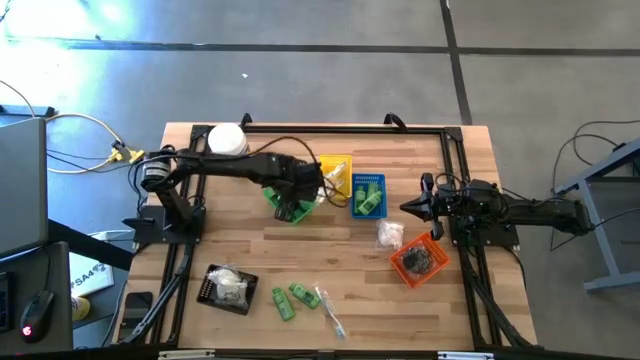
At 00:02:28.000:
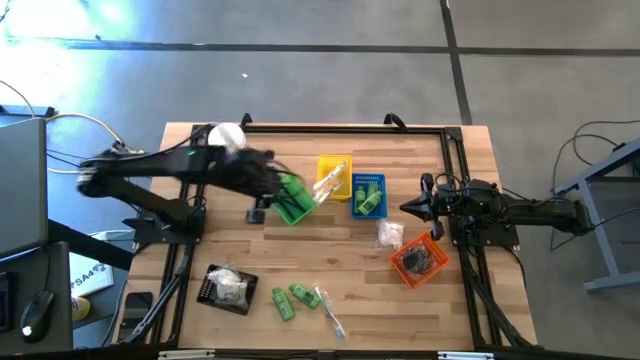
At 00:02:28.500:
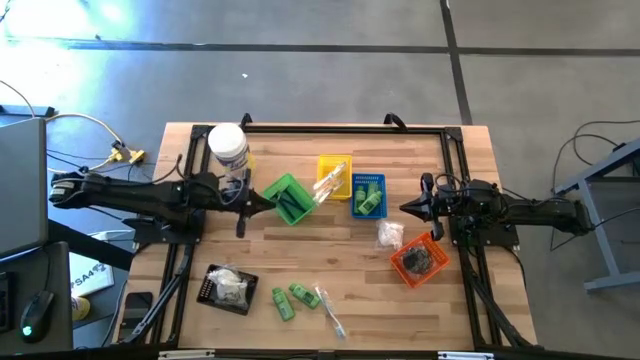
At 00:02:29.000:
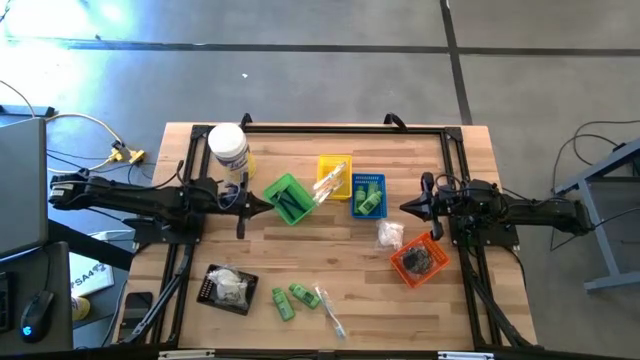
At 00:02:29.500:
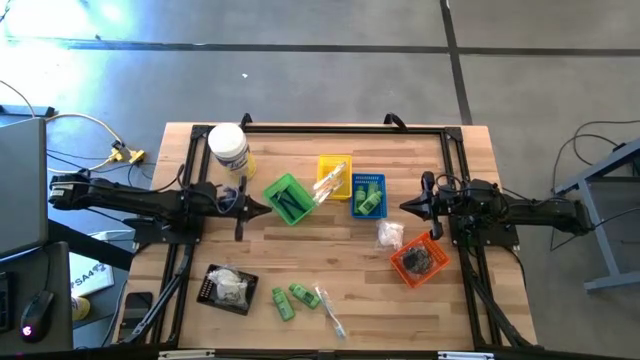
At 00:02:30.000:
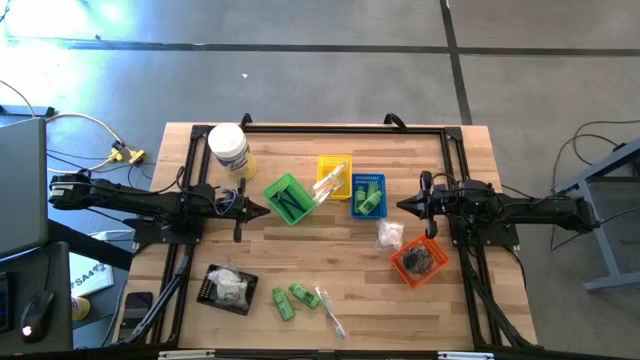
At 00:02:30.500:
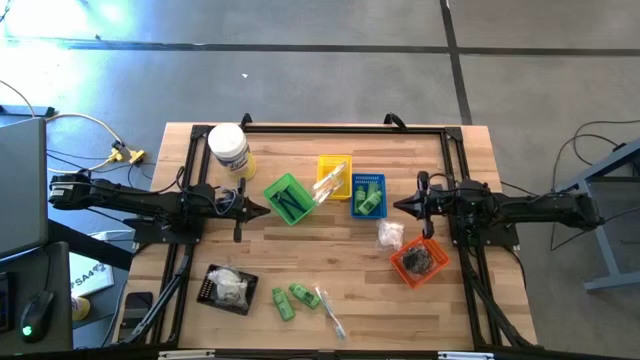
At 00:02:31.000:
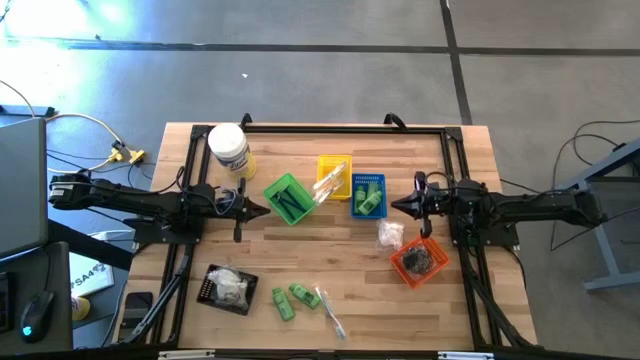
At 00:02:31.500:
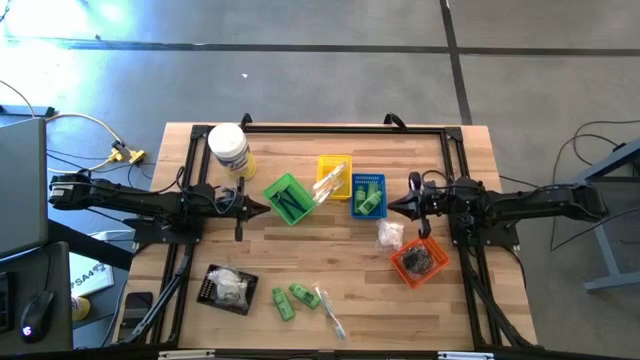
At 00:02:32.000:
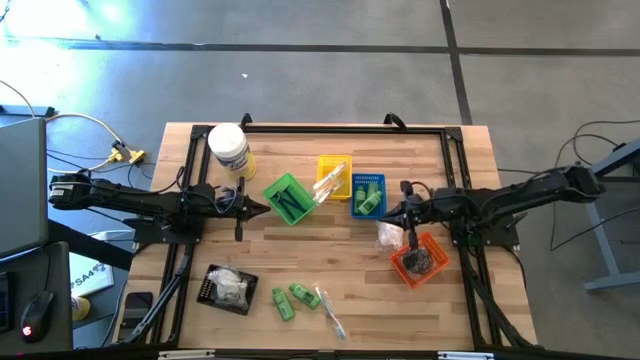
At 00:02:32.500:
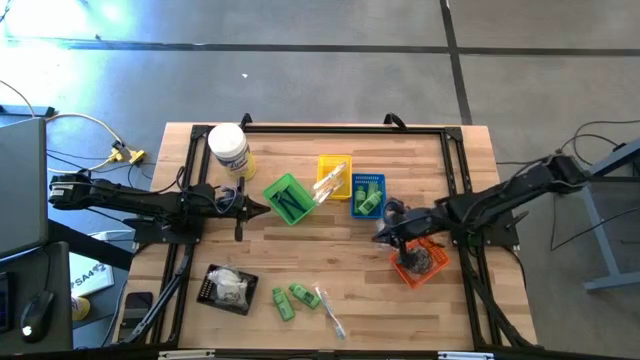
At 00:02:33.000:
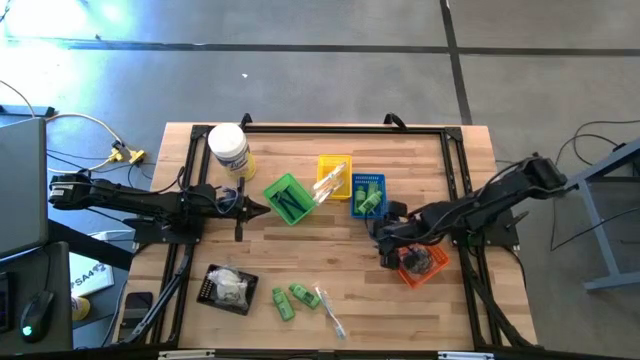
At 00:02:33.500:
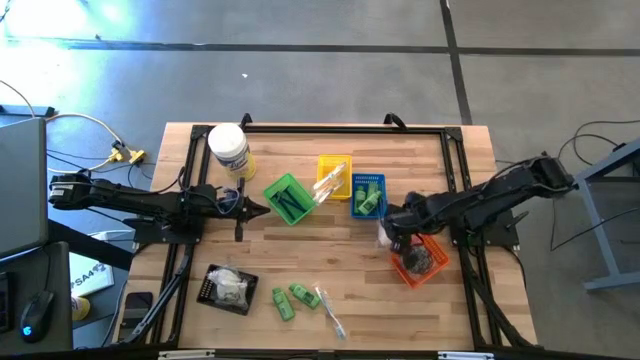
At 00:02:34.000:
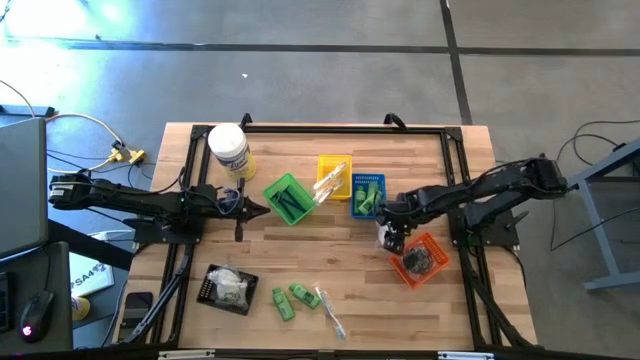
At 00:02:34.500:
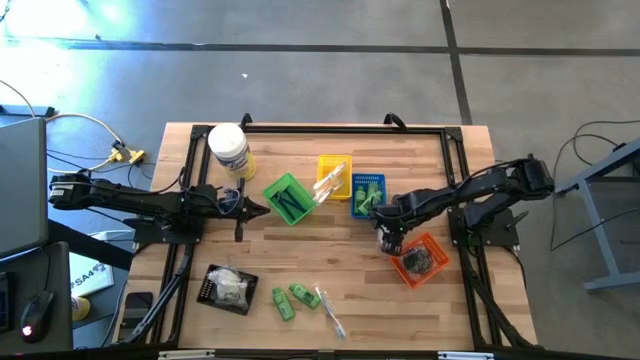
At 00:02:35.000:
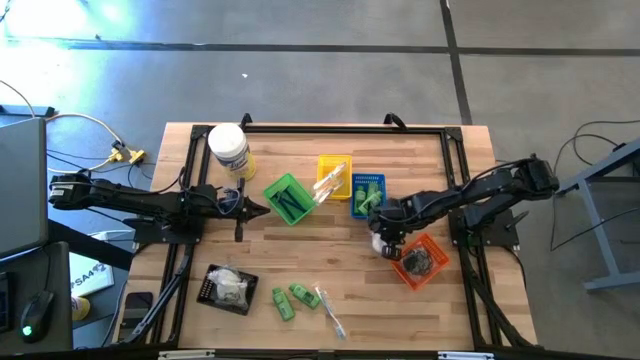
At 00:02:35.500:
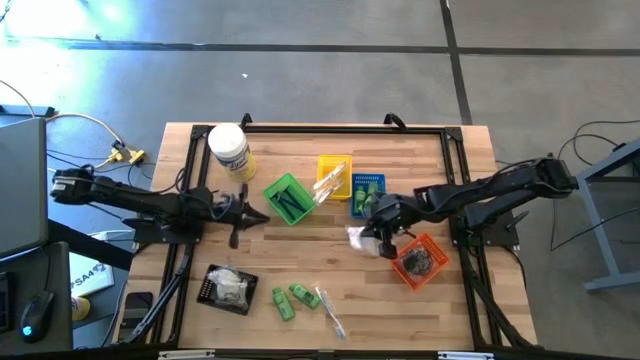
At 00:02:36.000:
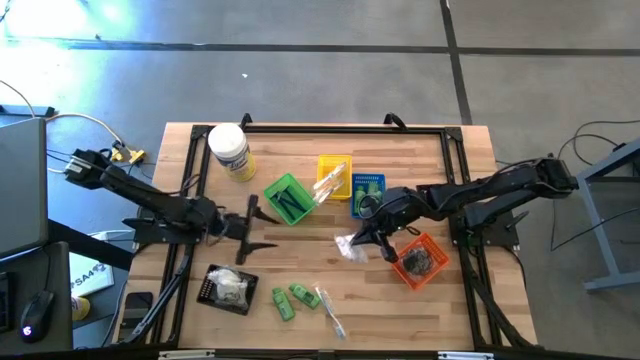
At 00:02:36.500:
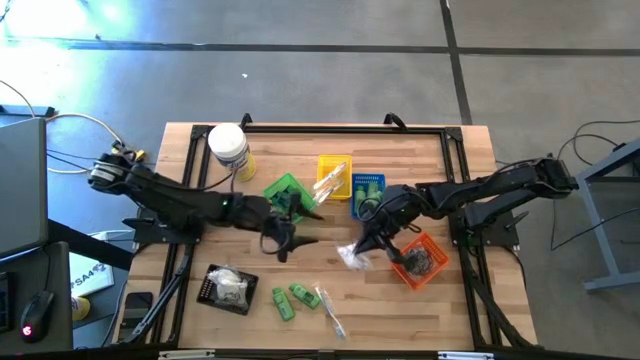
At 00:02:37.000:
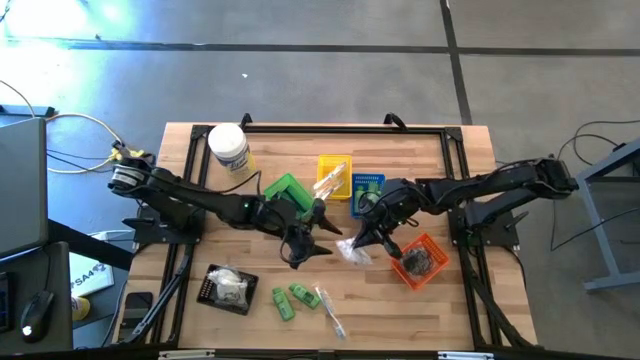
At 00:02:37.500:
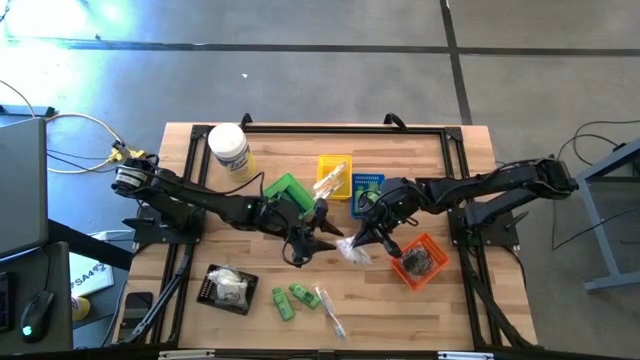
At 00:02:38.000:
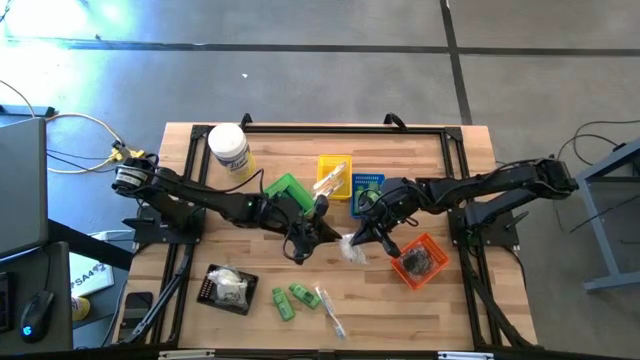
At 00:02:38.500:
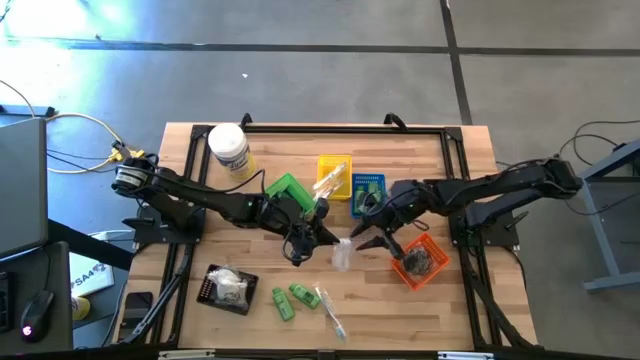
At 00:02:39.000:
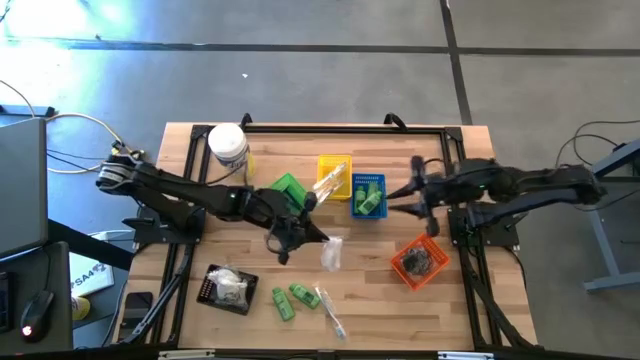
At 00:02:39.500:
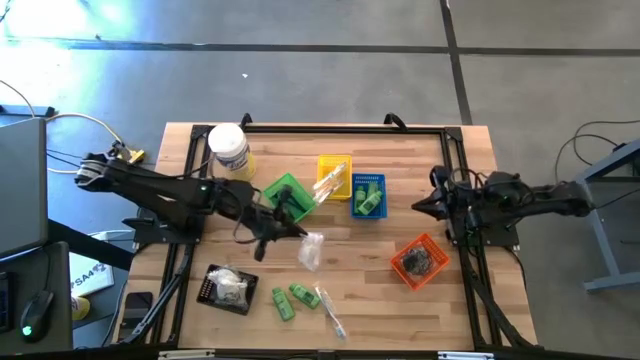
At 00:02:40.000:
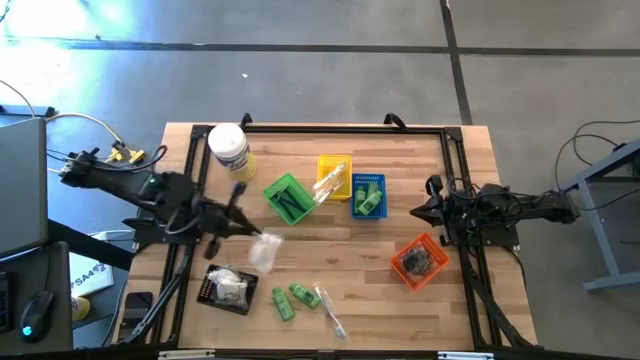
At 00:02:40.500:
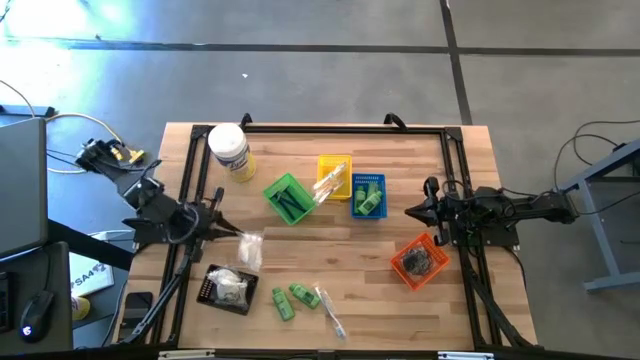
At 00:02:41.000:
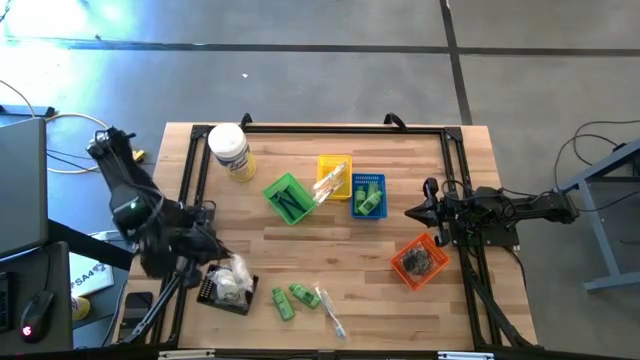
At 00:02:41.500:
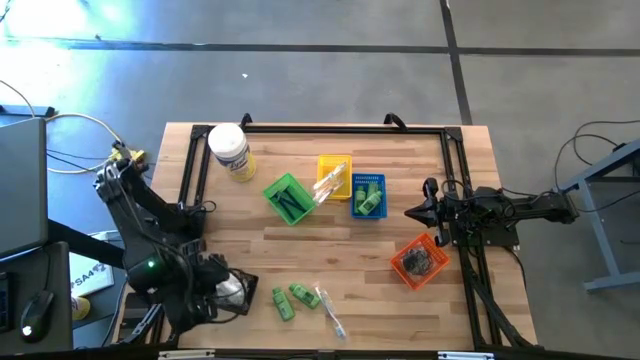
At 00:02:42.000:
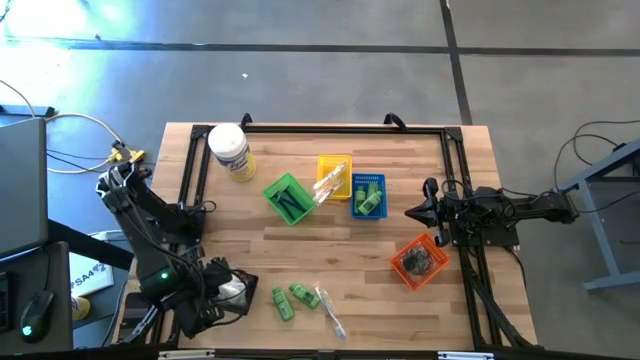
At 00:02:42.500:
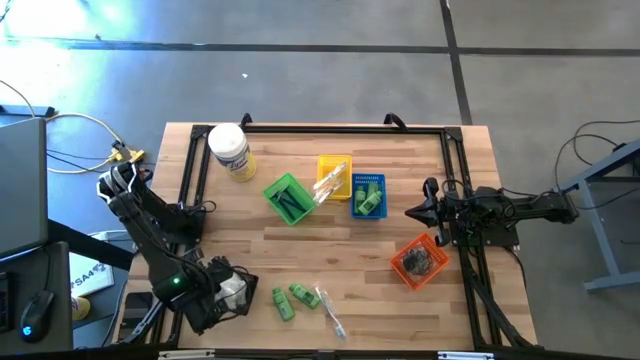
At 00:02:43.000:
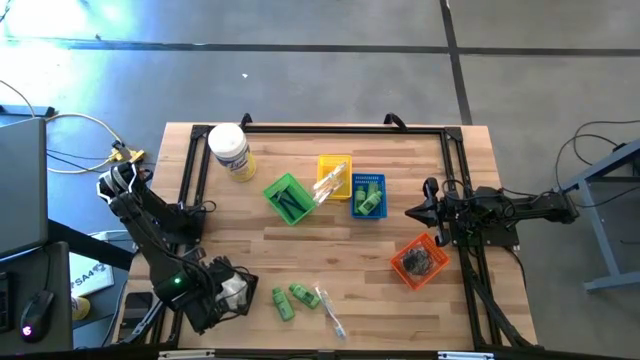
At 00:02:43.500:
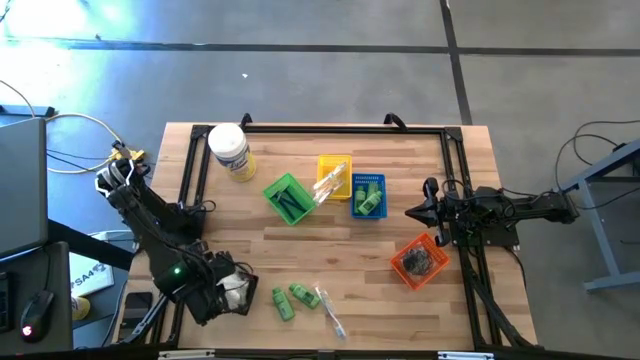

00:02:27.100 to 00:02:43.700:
Task: Pick & Place Travel size toiletries
Put the cotton pack into the black basket

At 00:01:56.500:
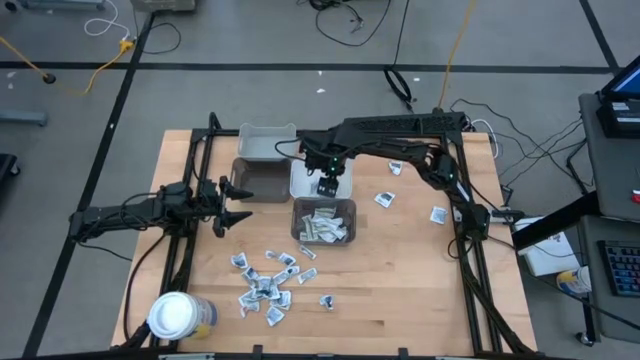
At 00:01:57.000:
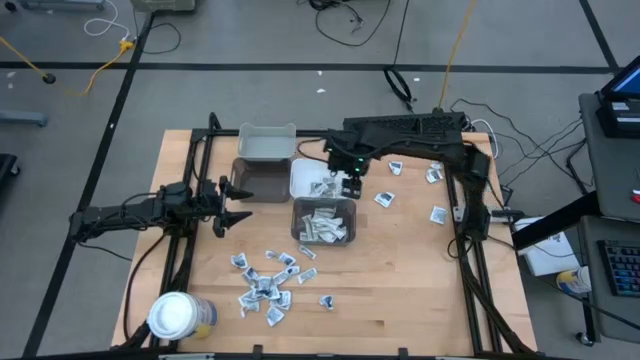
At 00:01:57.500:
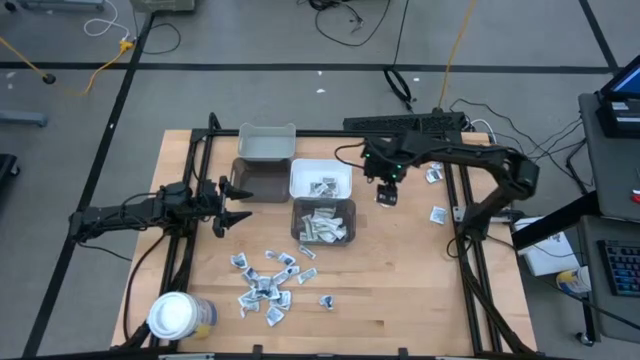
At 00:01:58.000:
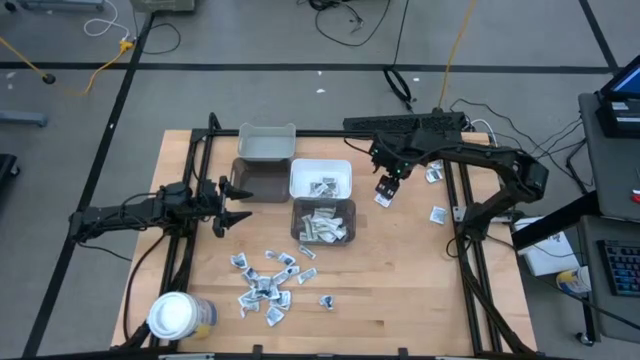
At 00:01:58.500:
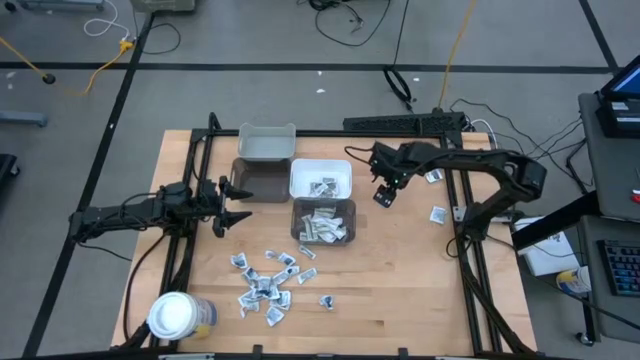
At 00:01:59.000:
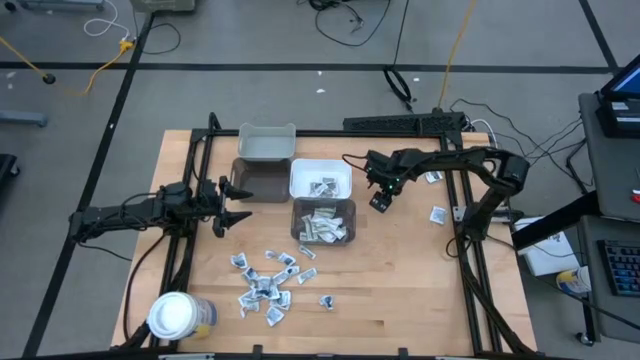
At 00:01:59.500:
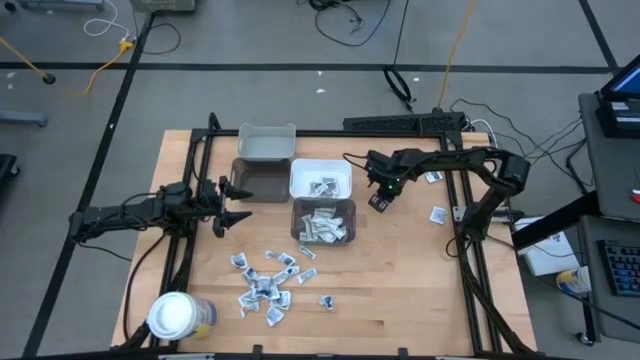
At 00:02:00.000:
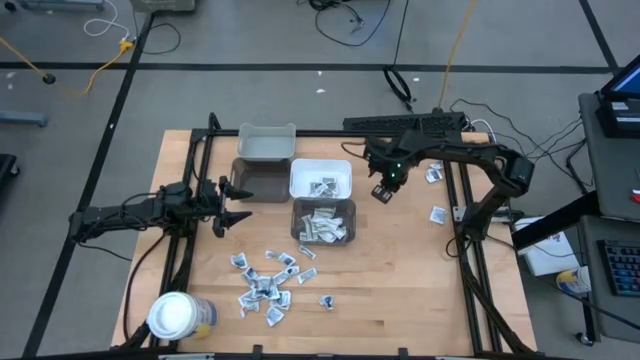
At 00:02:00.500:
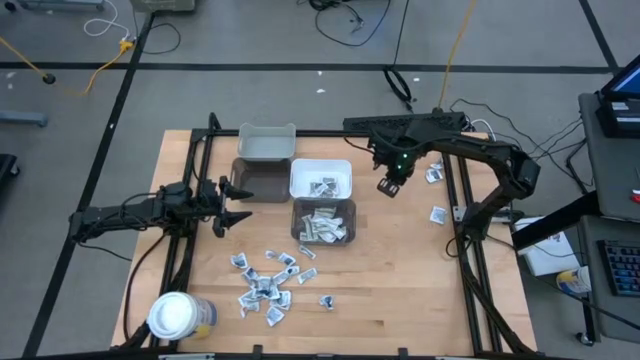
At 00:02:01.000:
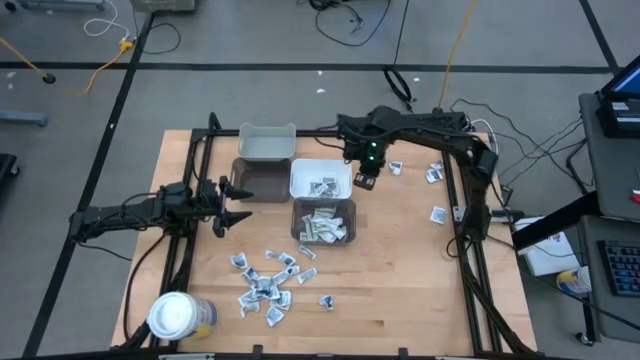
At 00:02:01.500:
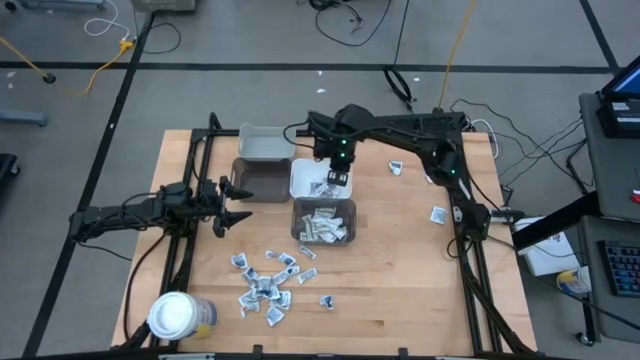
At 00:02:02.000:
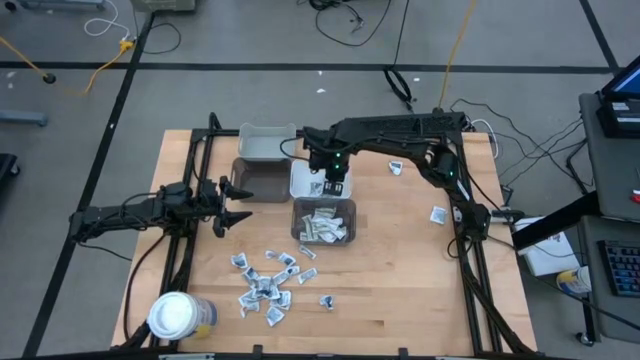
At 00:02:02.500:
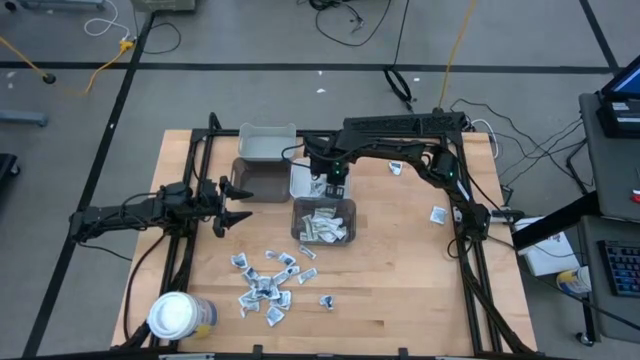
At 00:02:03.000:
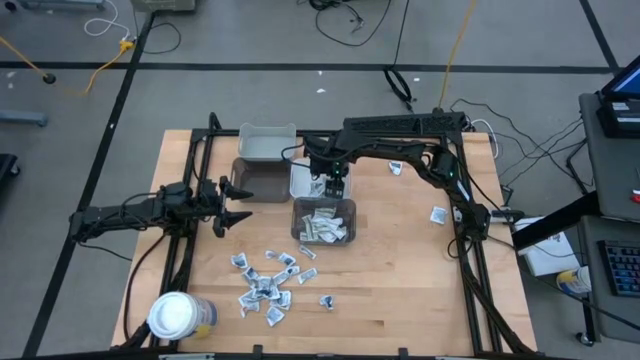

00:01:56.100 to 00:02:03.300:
Task: Pick & Place First Aid Supplies
Put the gray towelette pack into the white bin
